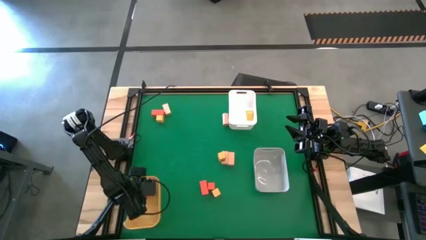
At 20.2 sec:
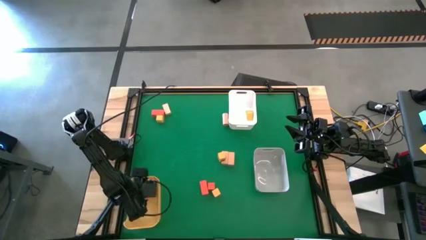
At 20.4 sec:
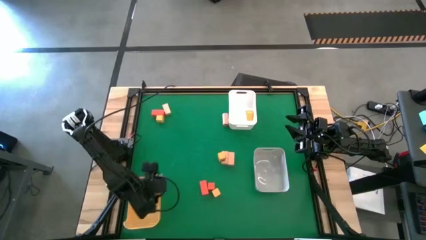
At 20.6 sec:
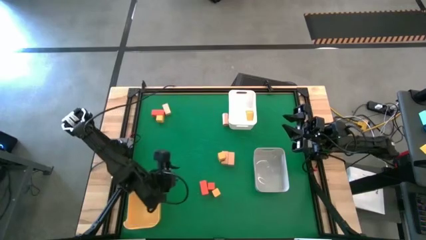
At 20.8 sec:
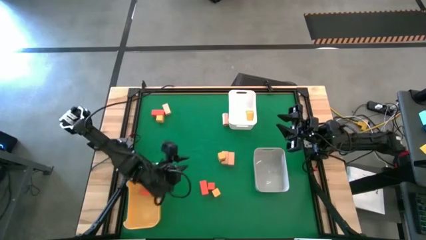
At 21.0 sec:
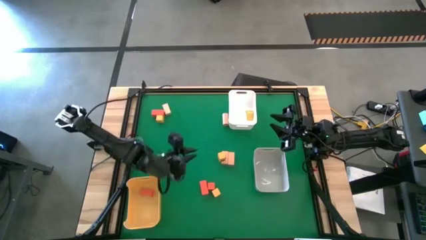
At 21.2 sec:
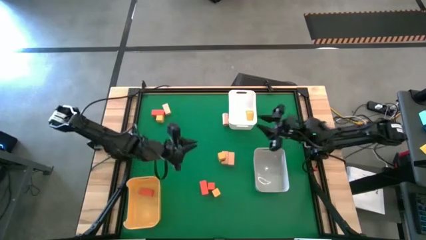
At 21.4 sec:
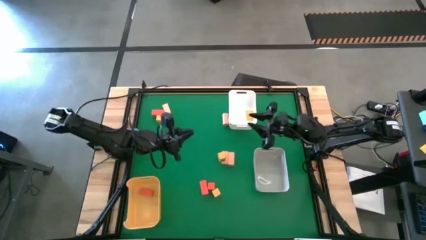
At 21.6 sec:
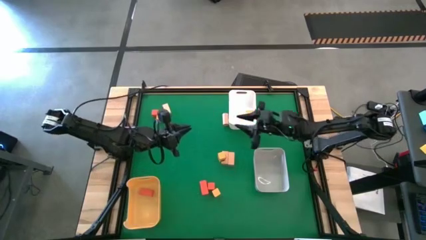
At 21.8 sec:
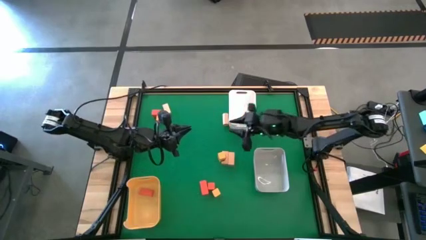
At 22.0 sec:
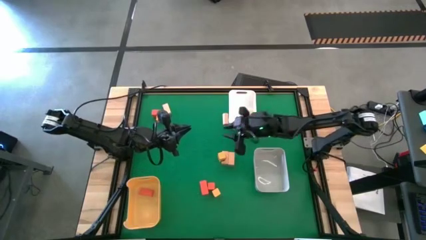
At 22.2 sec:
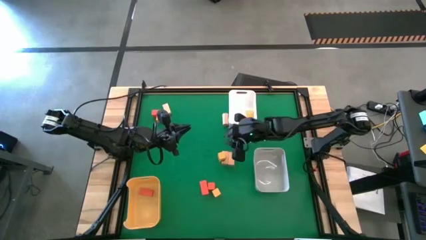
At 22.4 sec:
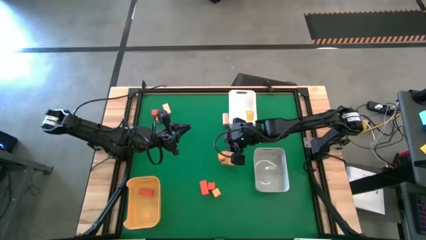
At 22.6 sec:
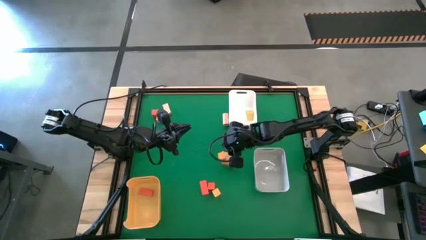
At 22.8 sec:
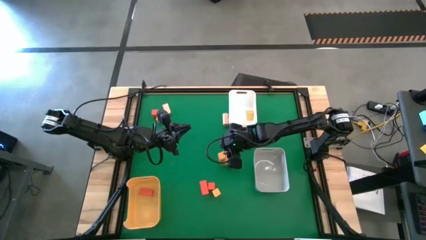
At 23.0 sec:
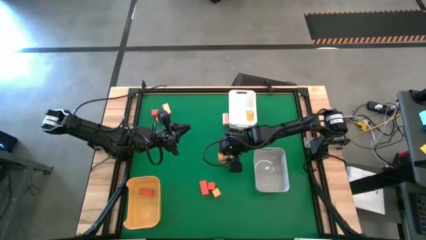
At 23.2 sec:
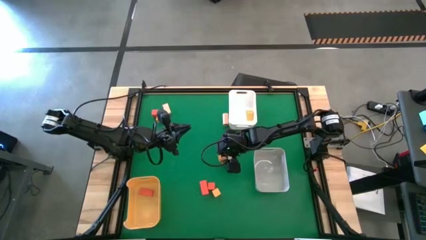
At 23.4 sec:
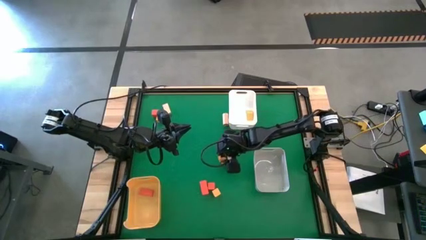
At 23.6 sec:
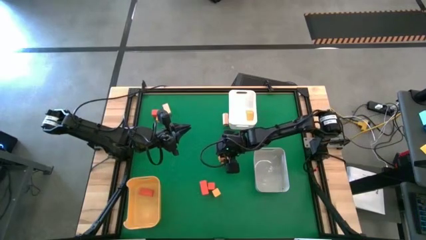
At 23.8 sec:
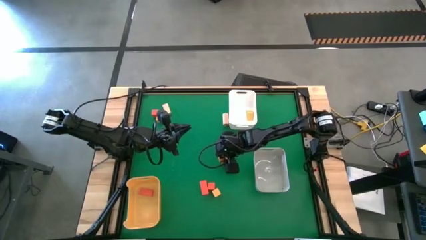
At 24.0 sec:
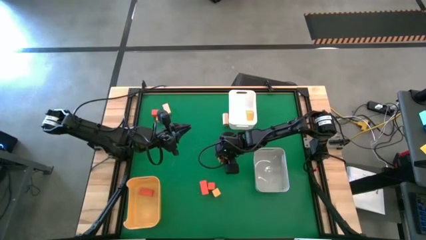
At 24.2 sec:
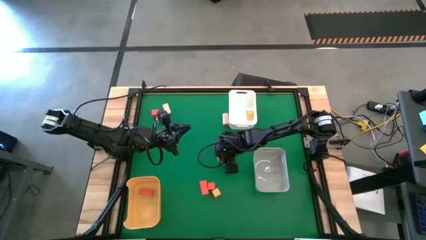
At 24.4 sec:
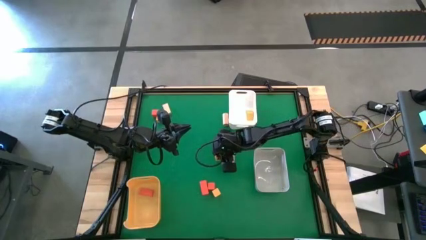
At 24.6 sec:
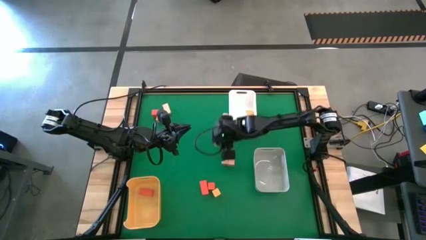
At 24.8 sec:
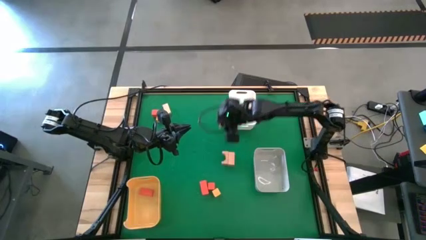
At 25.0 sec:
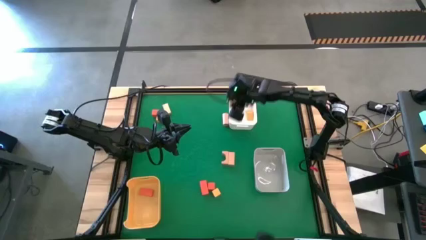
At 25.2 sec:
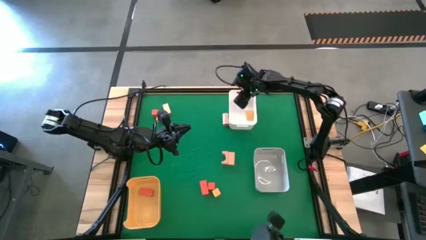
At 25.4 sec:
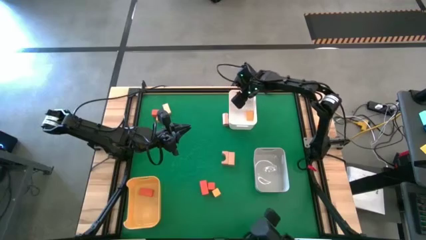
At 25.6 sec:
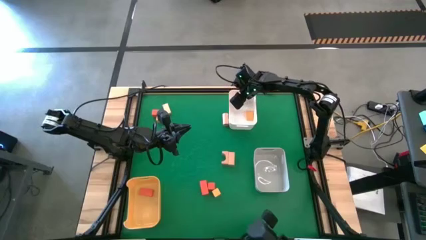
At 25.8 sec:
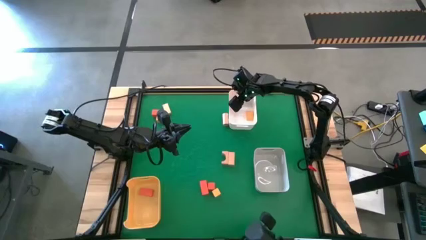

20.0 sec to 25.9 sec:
Task: Sort & place blocks by color
Put the yellow block into the white bin

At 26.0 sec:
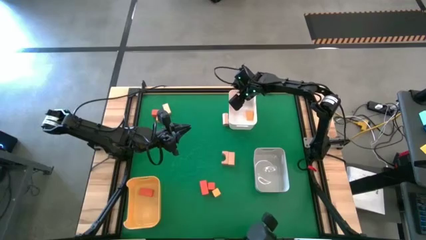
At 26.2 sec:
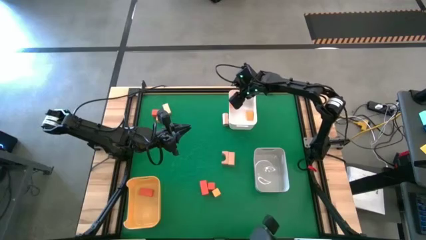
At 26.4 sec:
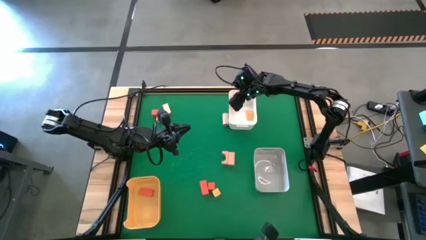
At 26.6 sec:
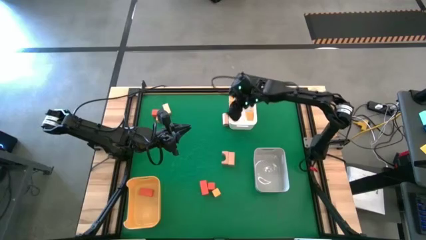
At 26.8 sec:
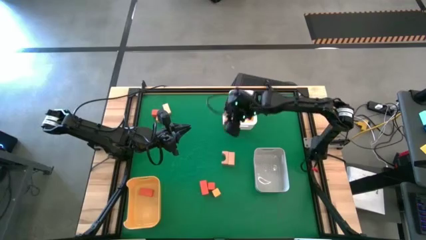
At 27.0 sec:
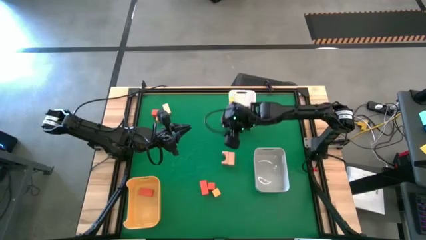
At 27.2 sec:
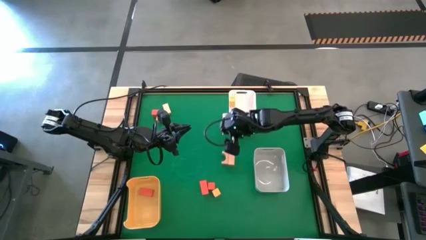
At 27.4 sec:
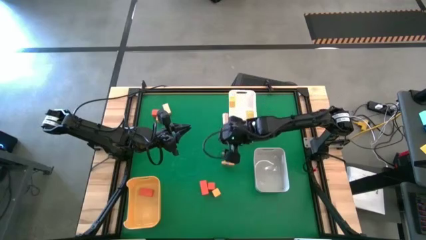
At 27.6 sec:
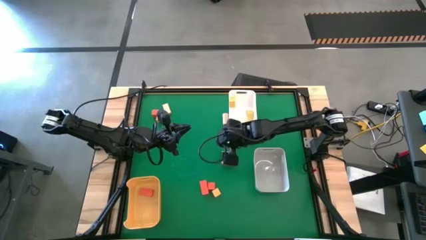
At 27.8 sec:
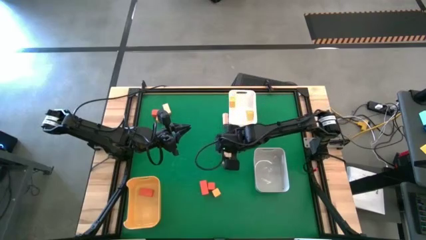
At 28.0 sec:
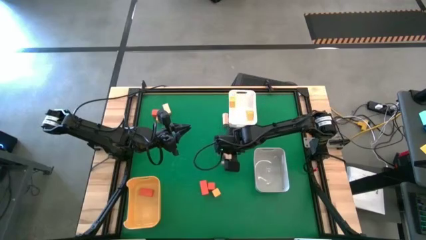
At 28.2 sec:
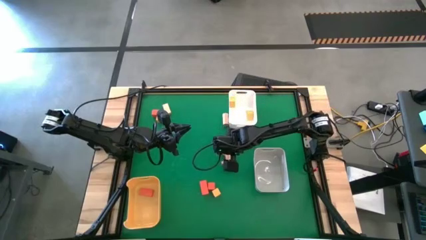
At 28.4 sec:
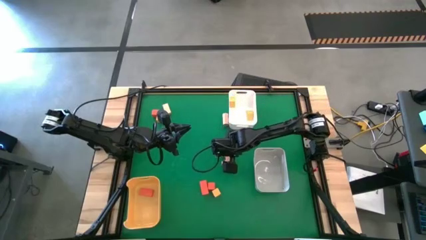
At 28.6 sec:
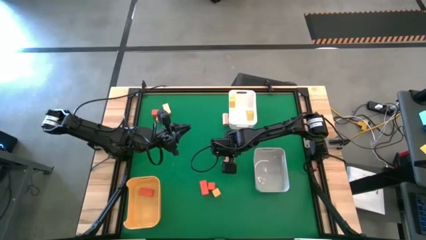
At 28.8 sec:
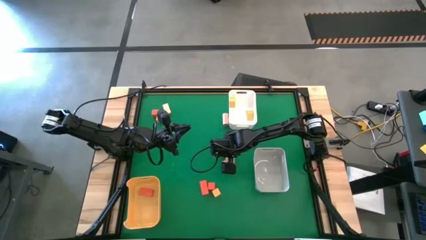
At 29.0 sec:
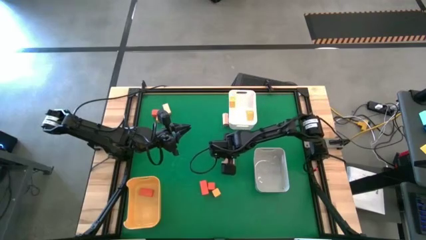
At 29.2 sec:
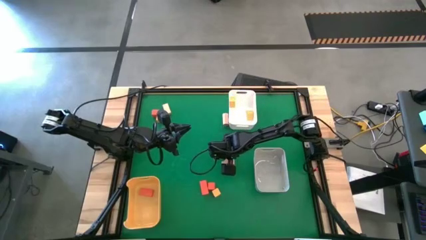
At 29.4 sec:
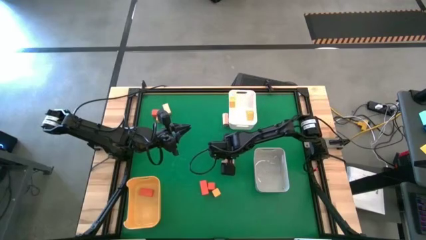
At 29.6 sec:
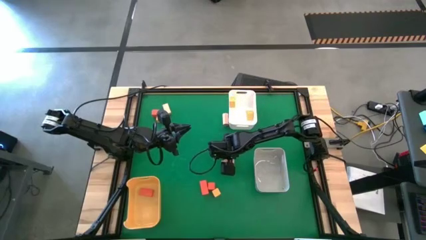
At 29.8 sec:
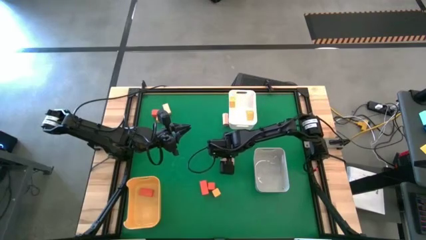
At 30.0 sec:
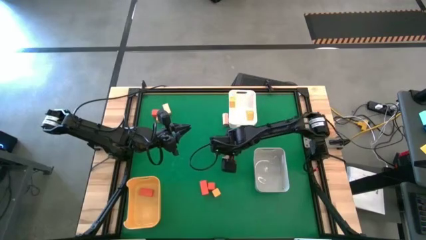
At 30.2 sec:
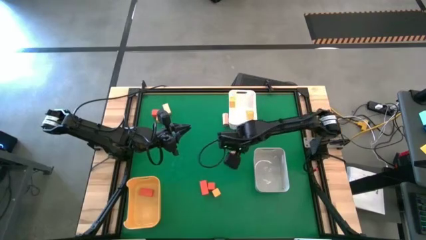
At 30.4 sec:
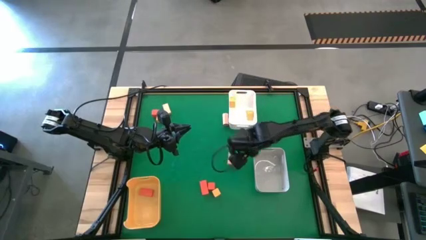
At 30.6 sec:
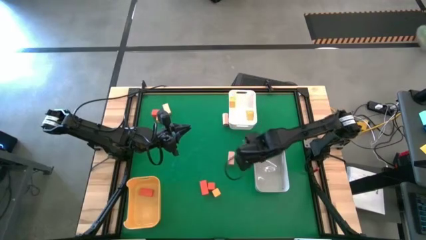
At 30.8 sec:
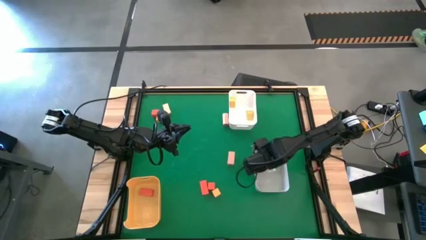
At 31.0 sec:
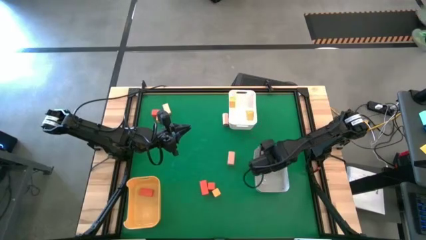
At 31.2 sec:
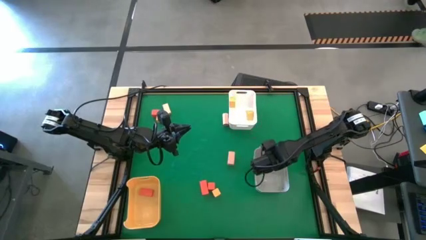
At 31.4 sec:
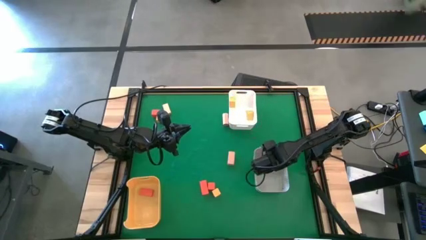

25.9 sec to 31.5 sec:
Put the brown block into the gray bin

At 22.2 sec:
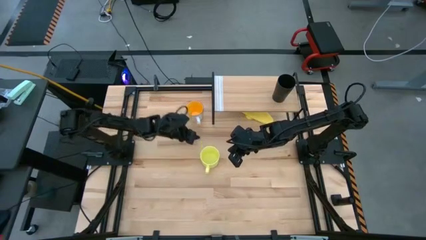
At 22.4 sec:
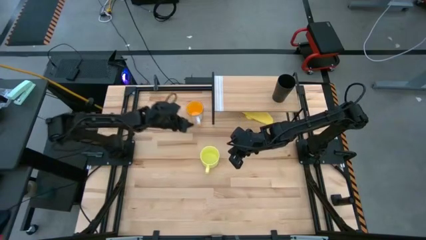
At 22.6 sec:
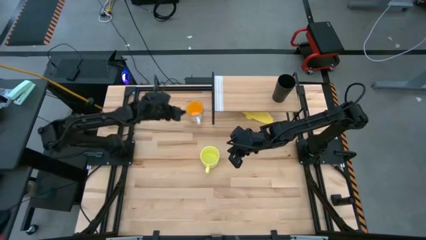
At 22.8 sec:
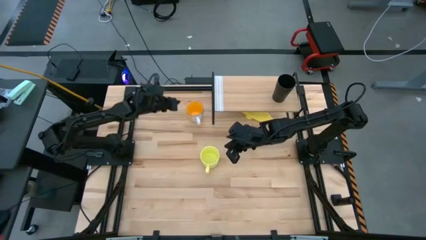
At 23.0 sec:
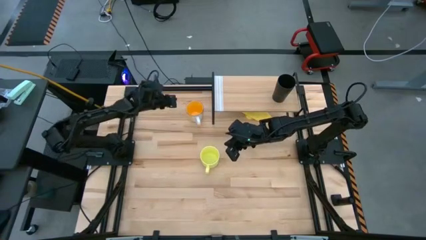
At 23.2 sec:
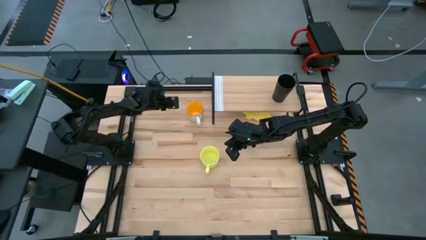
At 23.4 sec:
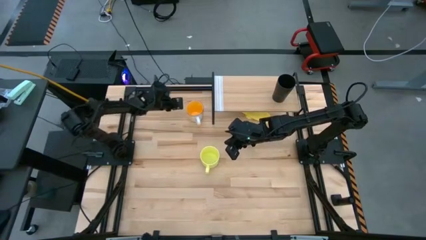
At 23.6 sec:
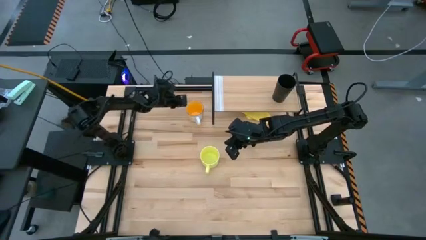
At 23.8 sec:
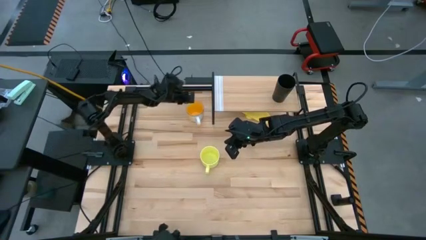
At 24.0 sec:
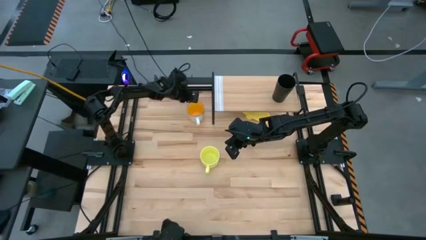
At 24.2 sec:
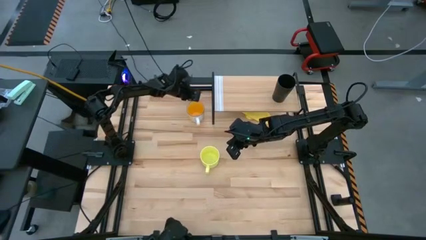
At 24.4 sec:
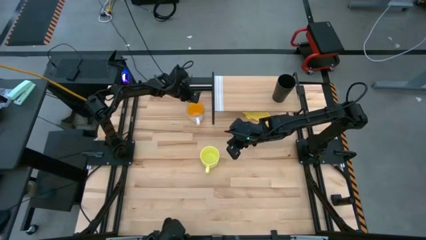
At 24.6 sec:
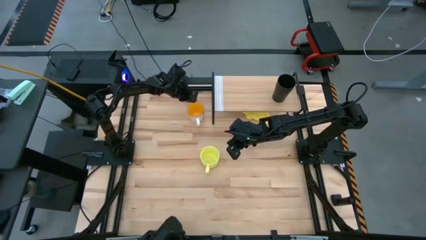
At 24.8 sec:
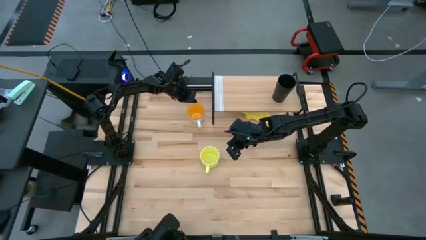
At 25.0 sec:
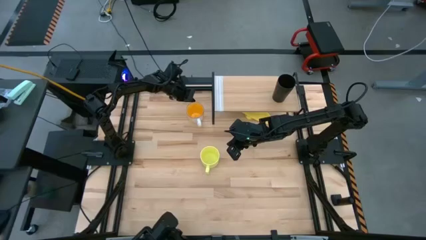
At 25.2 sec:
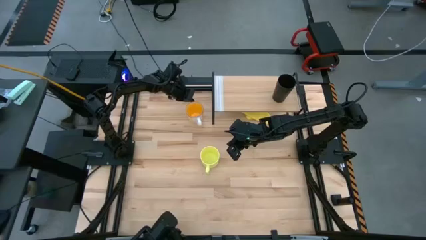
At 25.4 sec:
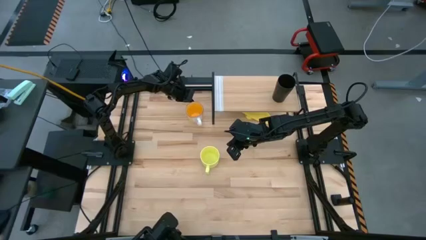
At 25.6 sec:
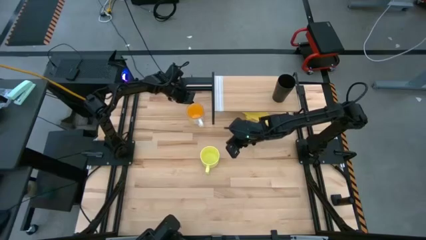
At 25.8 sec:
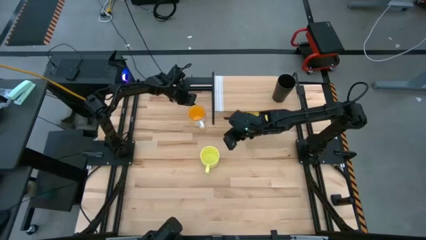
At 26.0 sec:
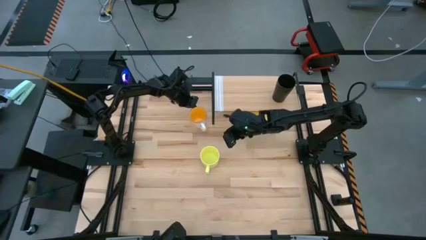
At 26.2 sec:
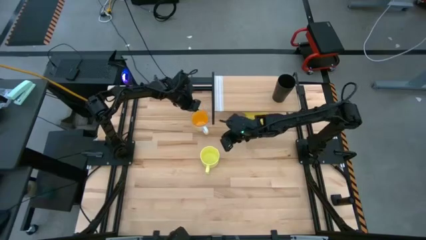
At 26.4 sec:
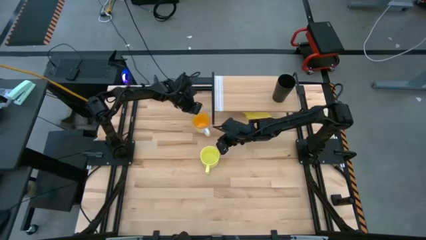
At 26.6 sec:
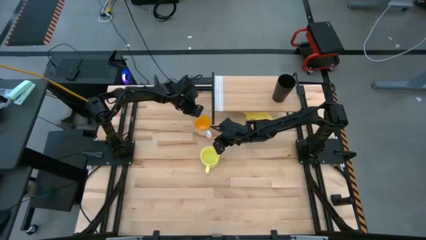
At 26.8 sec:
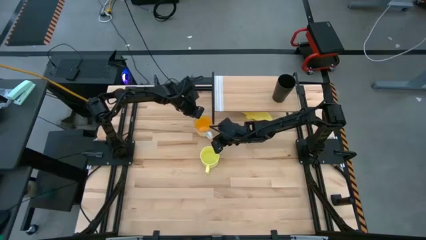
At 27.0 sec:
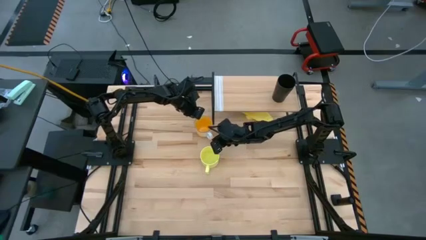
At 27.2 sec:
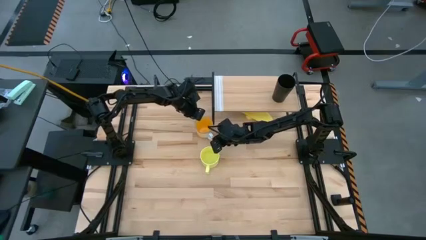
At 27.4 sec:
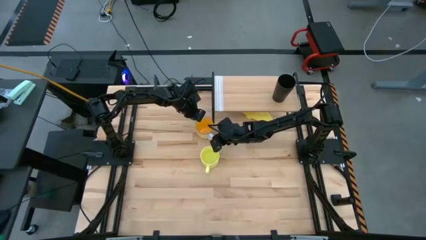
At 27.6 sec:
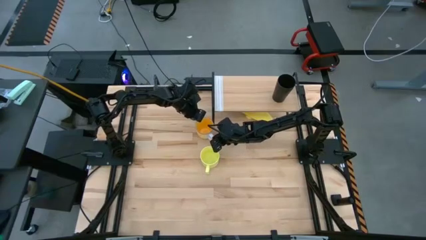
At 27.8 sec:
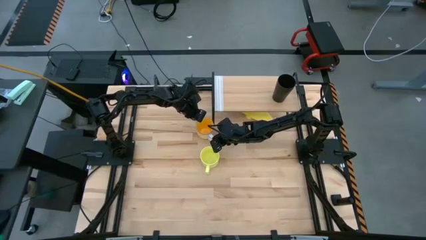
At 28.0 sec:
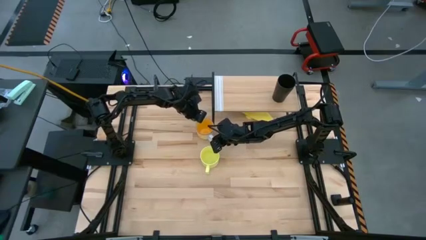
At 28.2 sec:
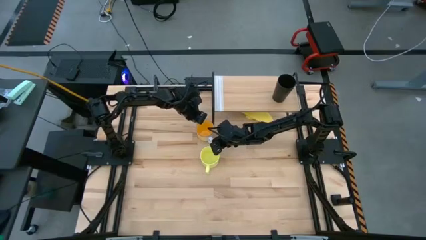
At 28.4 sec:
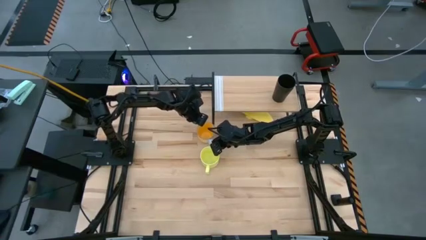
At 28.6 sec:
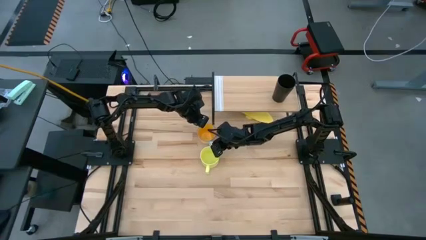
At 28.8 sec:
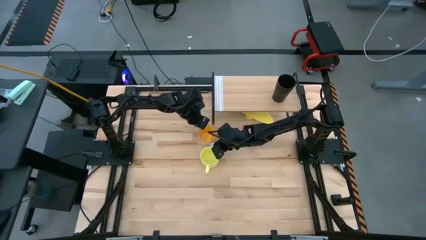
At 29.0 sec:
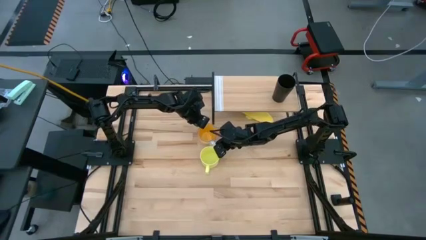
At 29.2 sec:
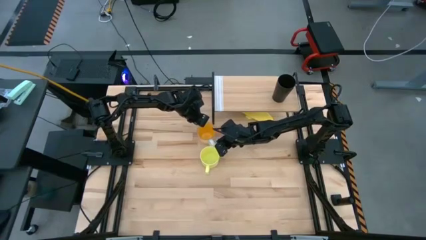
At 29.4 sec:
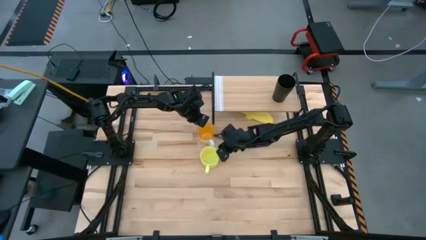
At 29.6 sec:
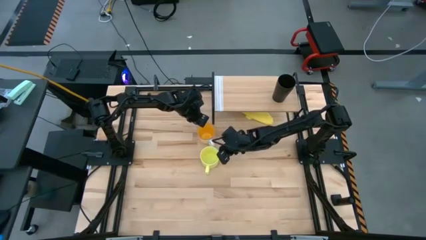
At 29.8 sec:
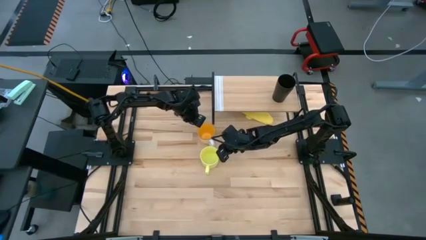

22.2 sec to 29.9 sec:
Task: Stack small to large cups/mugs on shelf
Move the orange mug to the middle of the table
